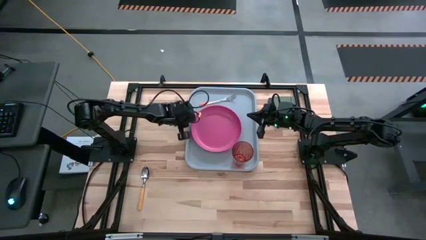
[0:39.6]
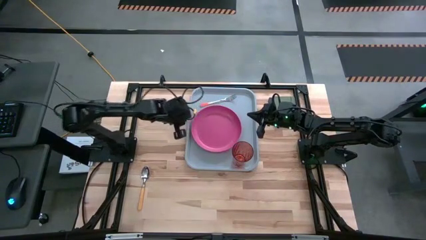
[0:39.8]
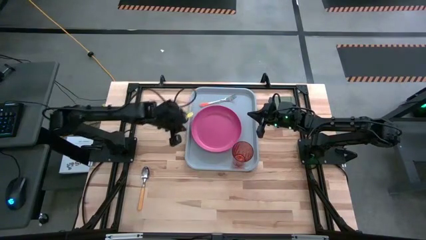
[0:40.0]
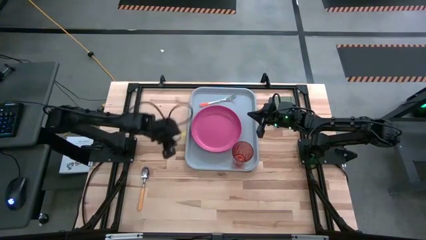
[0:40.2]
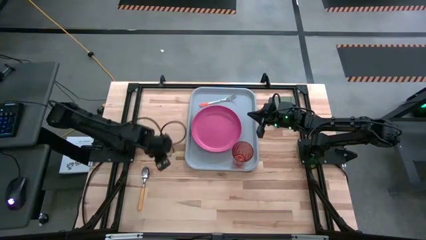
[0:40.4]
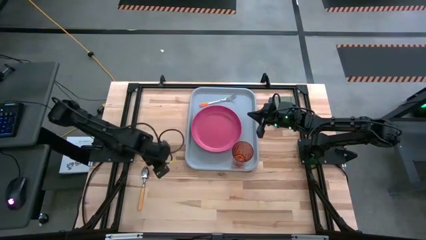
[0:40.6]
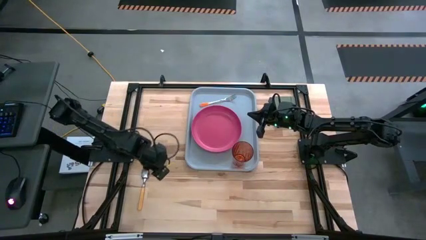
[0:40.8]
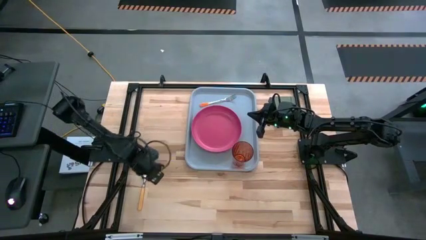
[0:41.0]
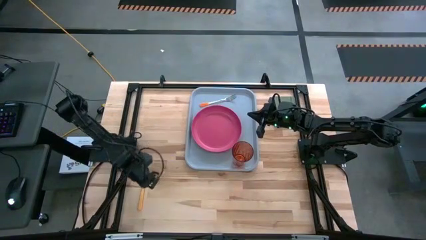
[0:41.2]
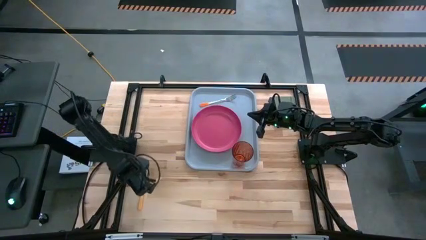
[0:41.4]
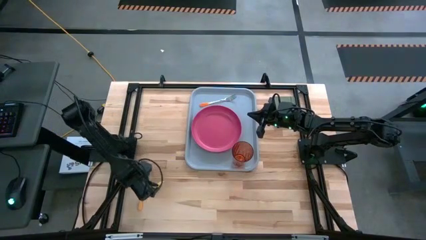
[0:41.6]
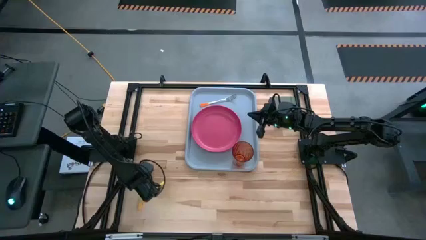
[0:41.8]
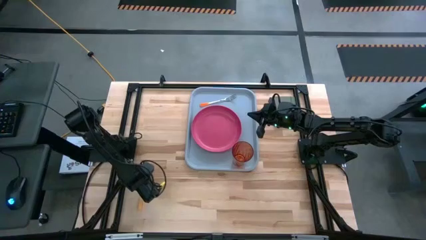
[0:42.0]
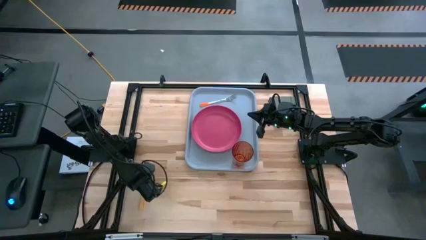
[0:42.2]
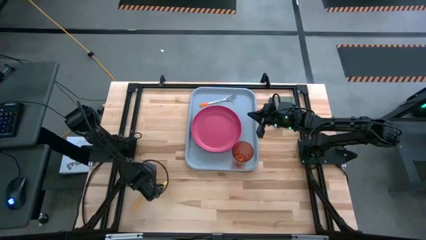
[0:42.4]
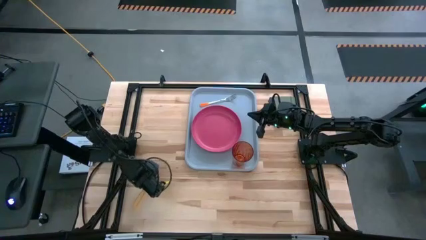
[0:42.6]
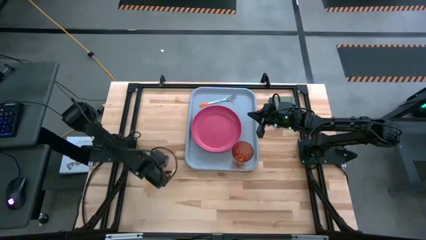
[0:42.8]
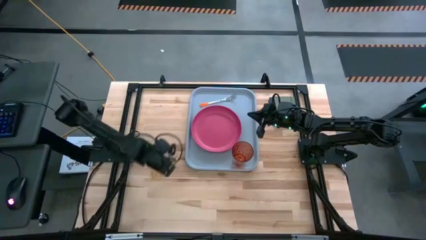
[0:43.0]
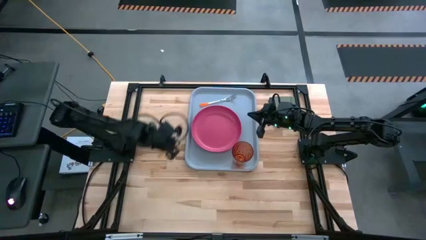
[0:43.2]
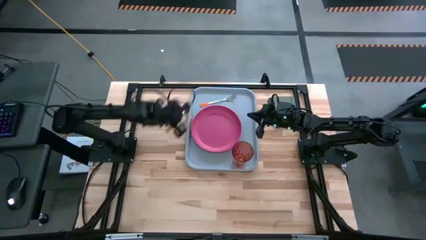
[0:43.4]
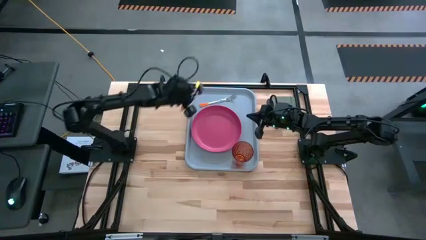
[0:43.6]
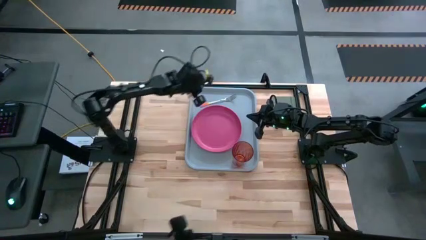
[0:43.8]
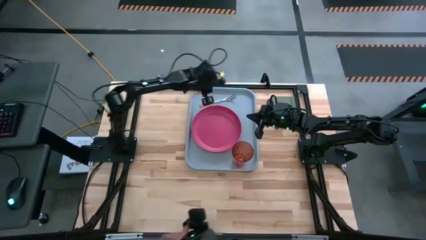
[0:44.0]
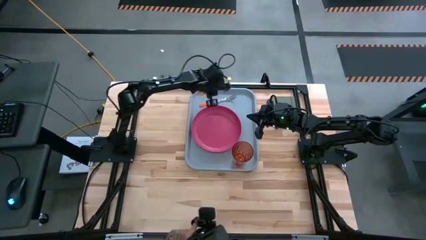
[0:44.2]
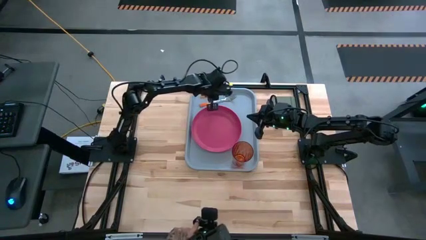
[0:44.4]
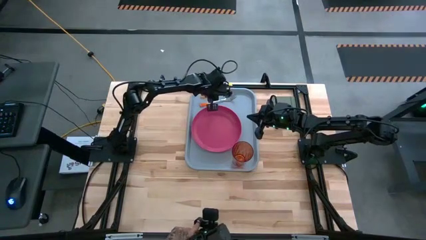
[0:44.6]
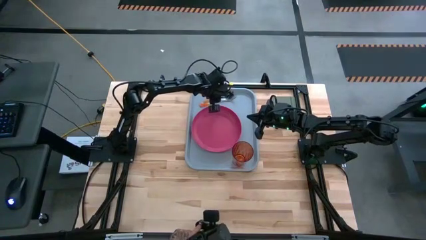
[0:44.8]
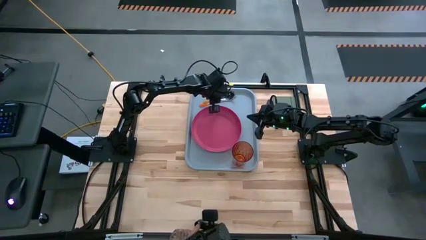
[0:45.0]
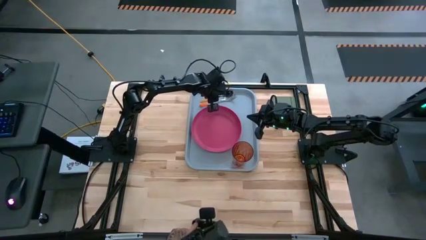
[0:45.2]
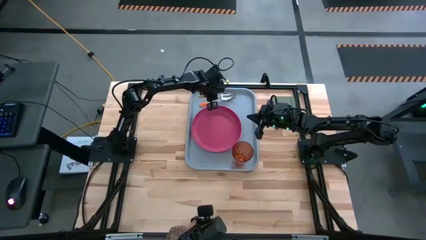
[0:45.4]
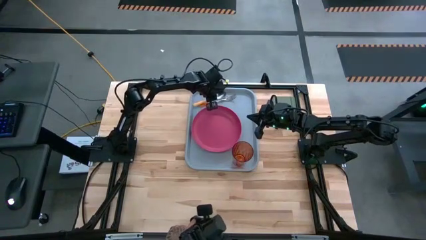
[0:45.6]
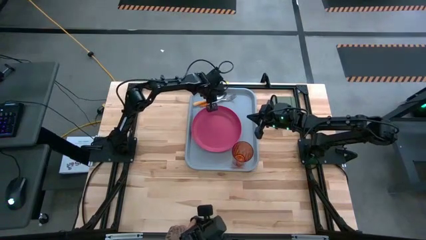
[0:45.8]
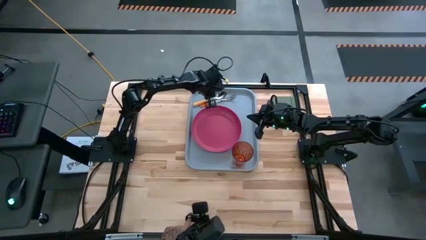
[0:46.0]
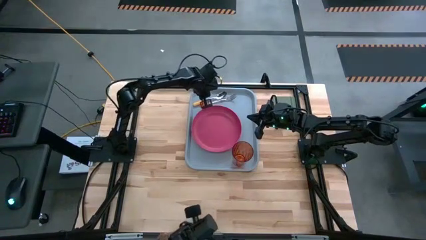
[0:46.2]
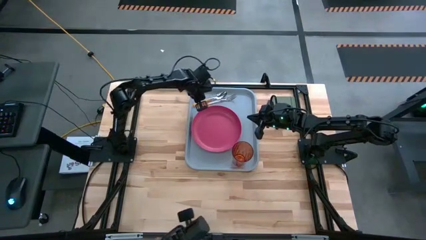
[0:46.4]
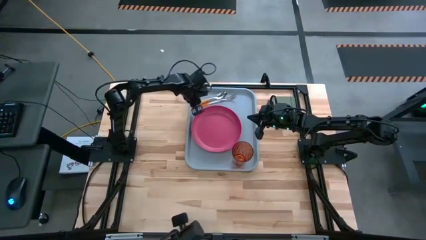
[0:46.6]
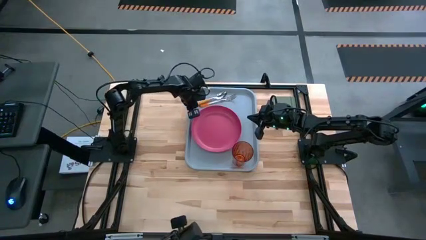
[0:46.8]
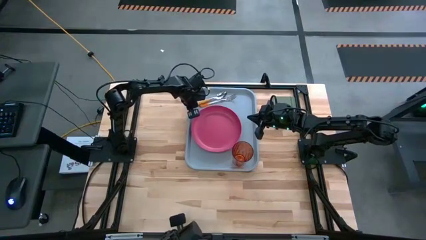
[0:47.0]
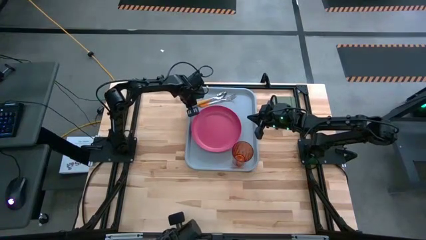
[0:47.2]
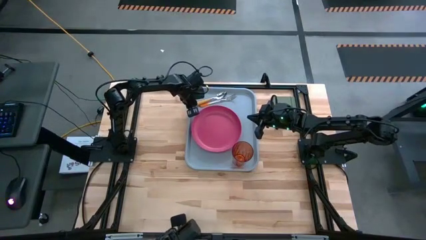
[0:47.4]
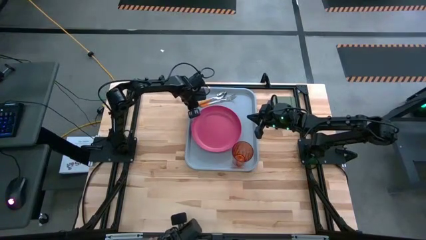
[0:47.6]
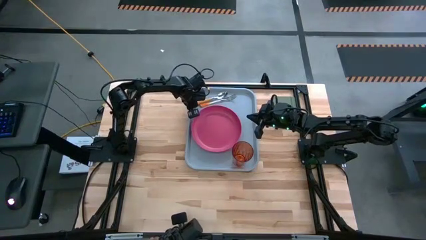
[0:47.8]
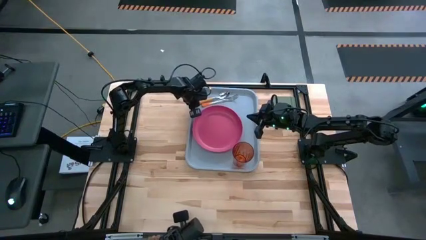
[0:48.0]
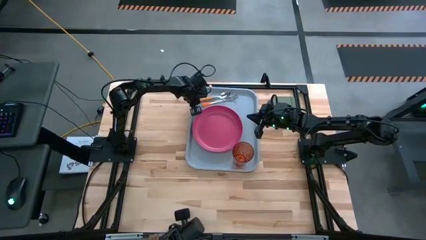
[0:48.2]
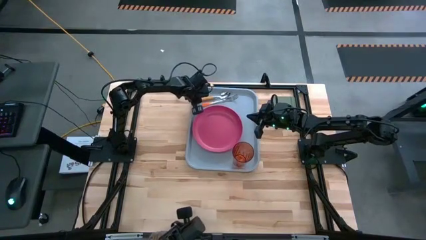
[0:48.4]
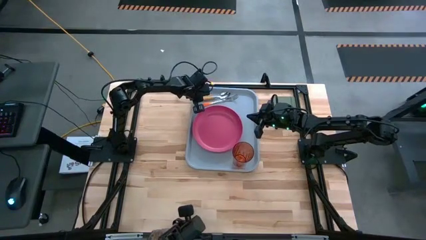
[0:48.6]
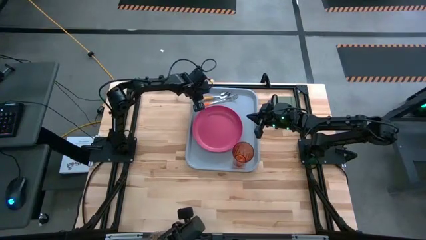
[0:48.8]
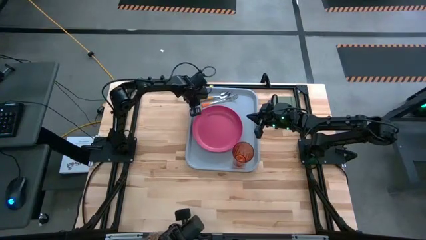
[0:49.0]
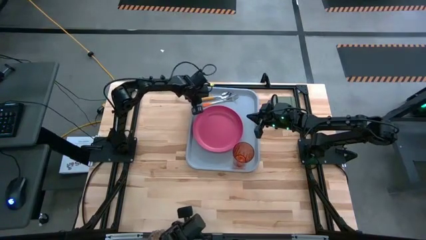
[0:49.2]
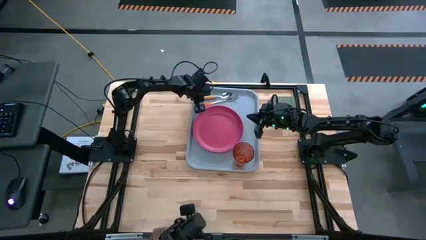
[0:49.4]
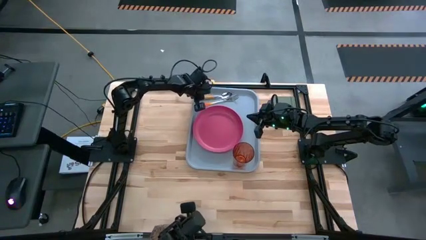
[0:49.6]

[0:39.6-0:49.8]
Task: Pick and place plate/cup/fork/spoon on tray
Put the yellow spoon on the gray serving tray to the left of the orange fork

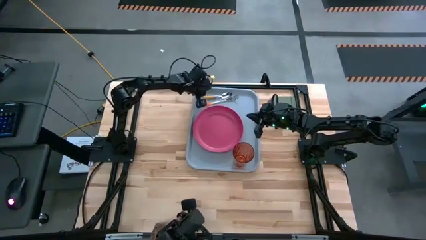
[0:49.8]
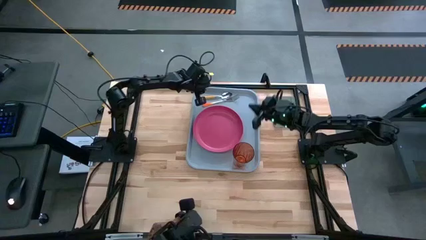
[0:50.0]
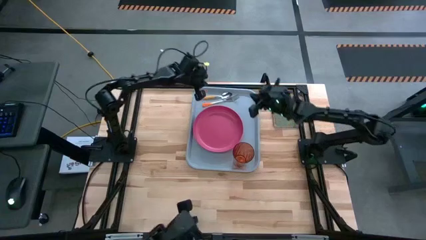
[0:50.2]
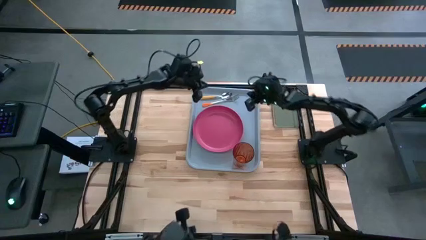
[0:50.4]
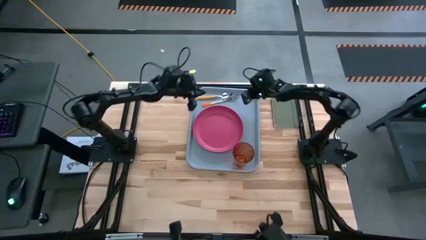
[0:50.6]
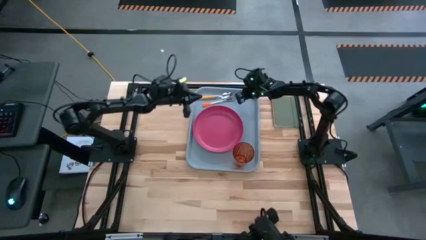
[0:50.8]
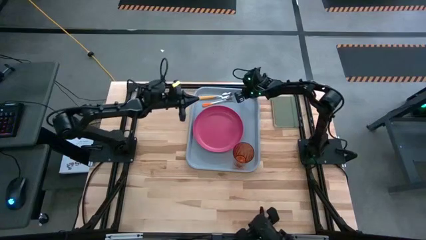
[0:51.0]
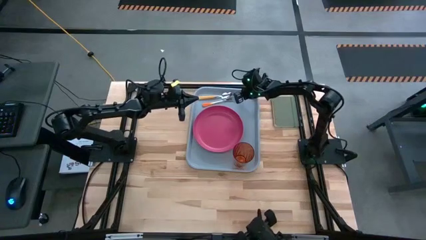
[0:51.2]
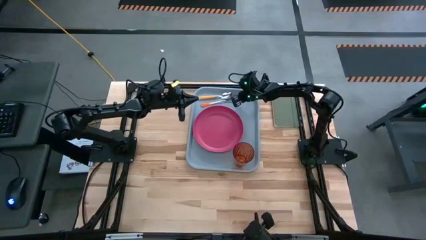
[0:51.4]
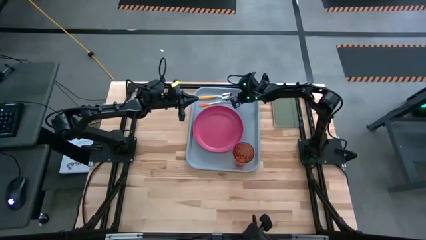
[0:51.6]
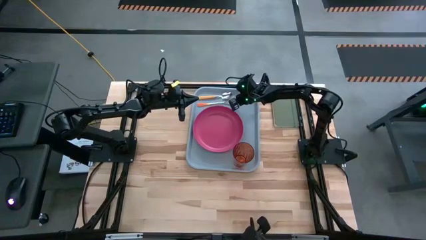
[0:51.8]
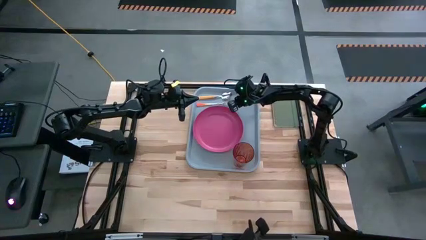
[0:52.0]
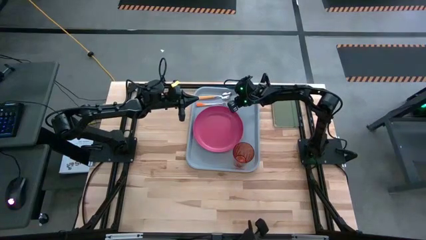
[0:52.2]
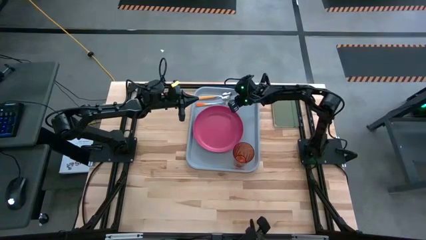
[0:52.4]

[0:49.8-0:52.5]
Adjust the fork on the gray serving tray
